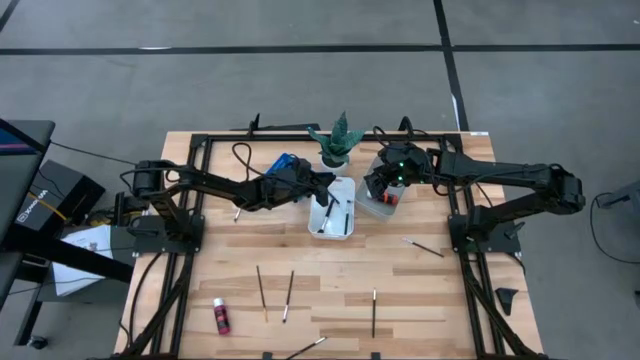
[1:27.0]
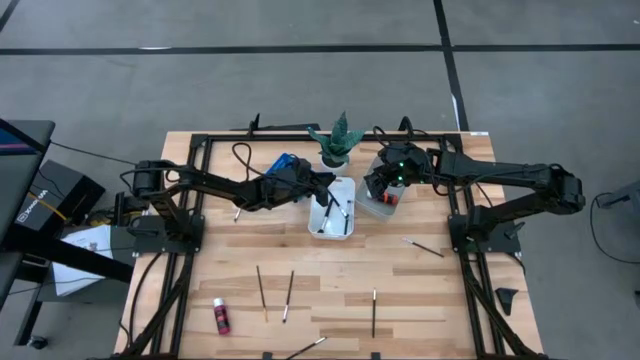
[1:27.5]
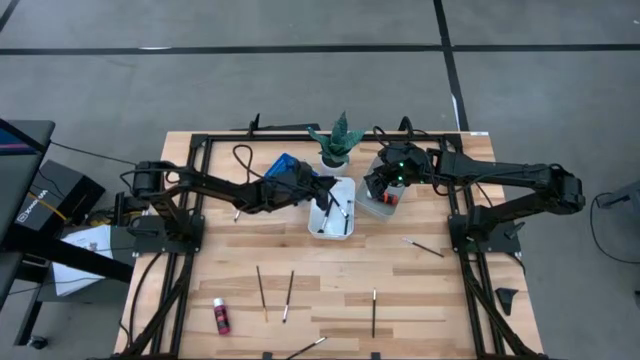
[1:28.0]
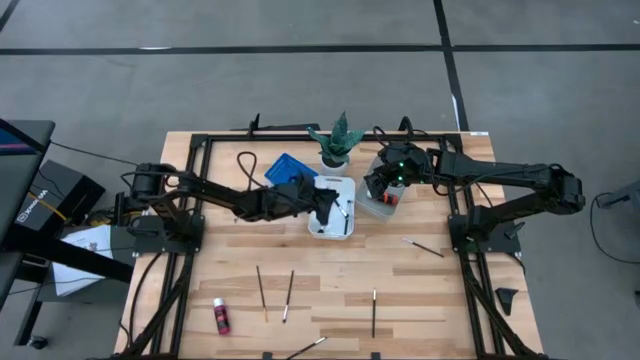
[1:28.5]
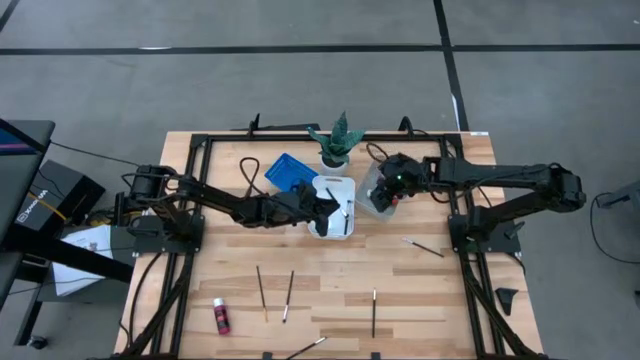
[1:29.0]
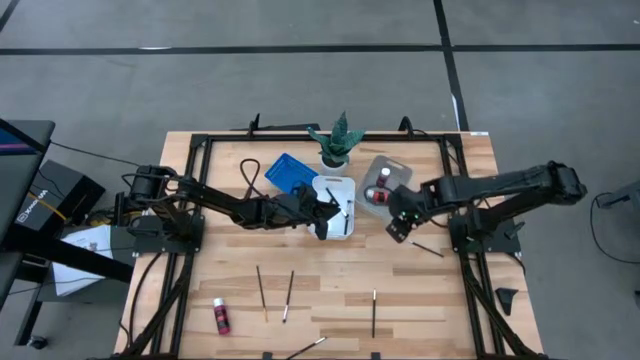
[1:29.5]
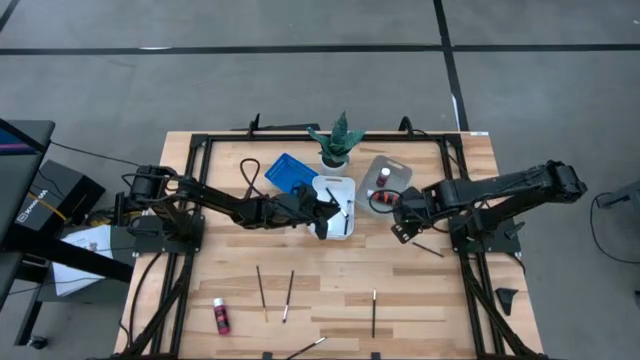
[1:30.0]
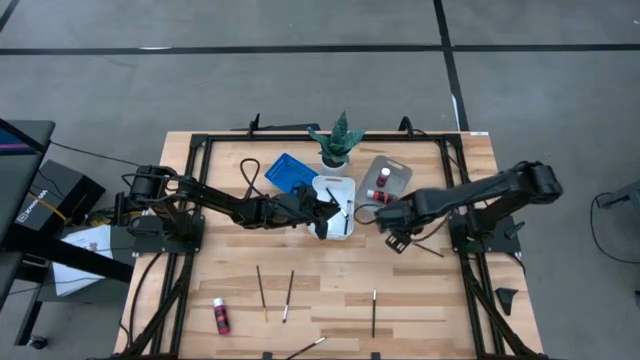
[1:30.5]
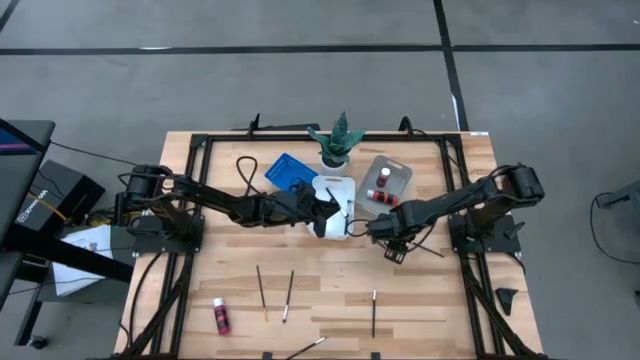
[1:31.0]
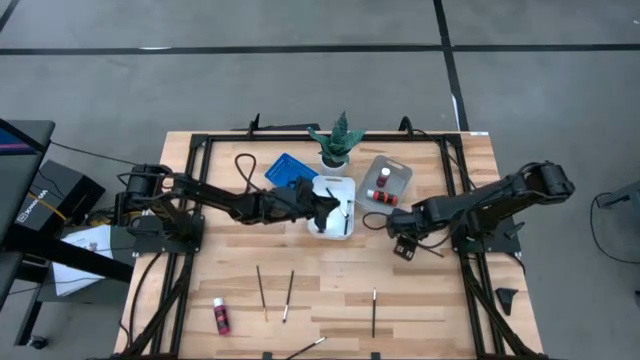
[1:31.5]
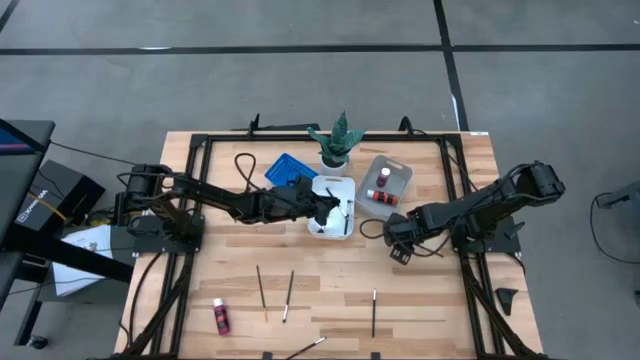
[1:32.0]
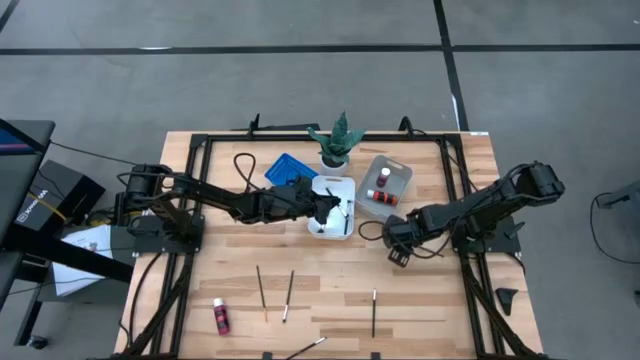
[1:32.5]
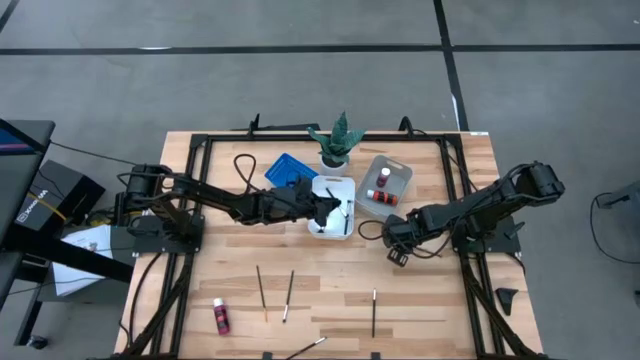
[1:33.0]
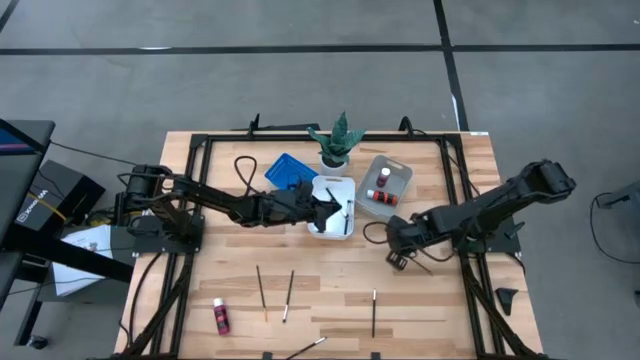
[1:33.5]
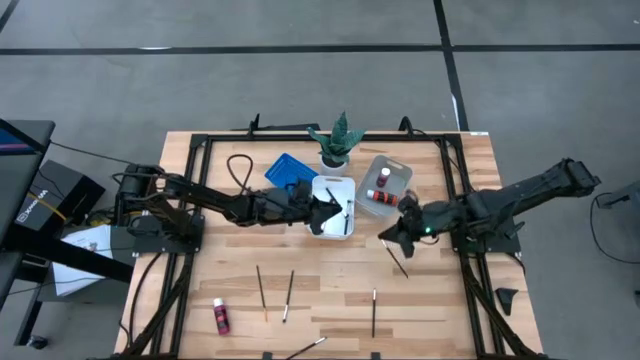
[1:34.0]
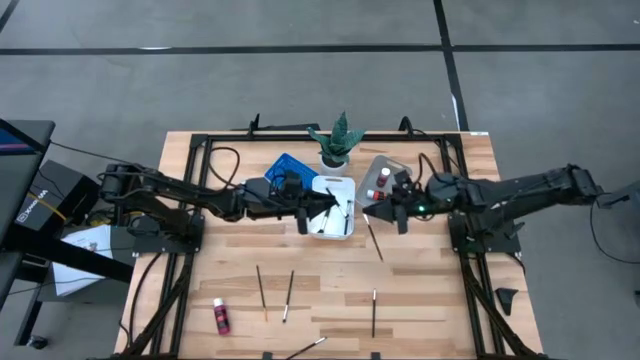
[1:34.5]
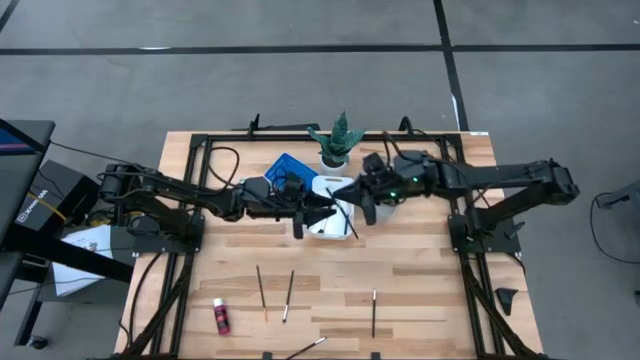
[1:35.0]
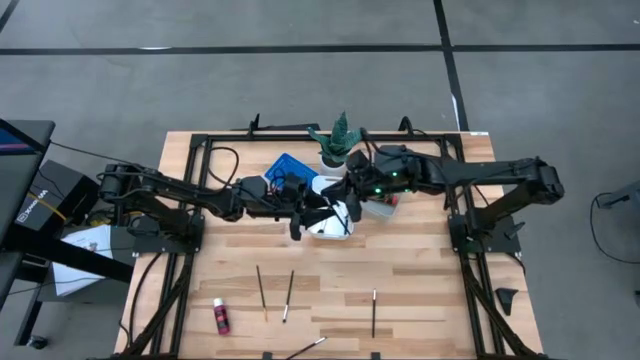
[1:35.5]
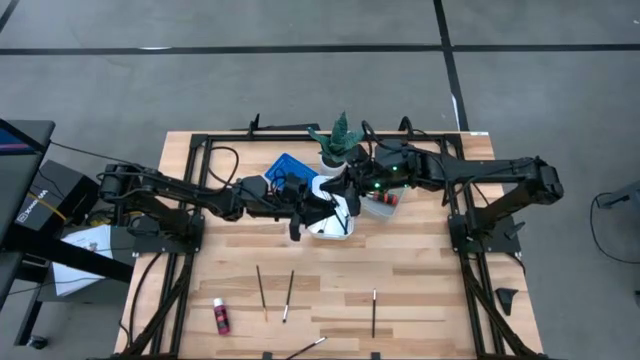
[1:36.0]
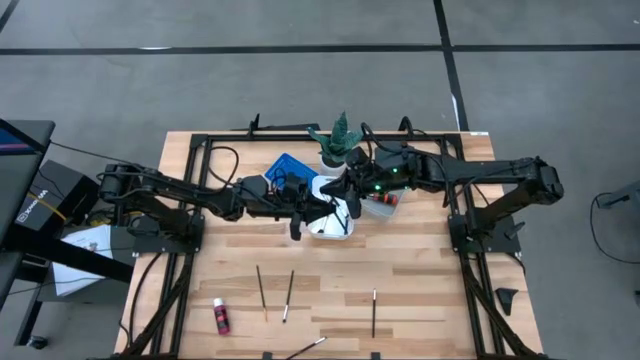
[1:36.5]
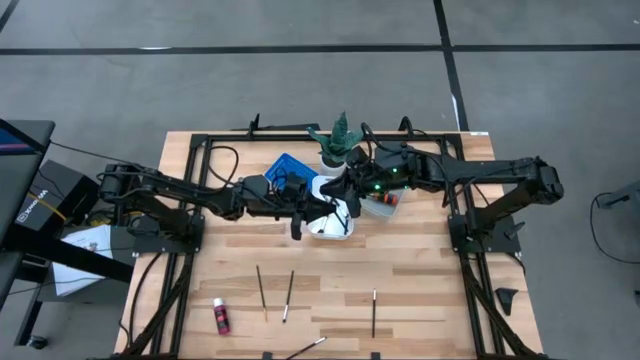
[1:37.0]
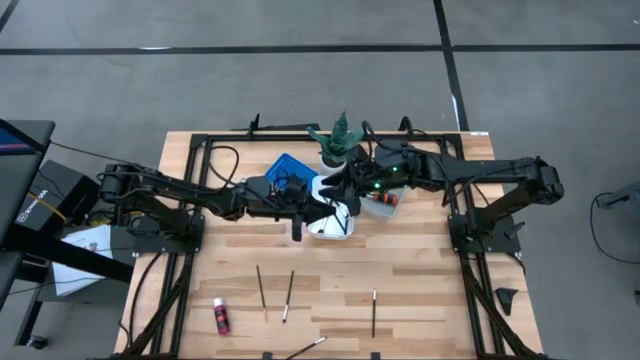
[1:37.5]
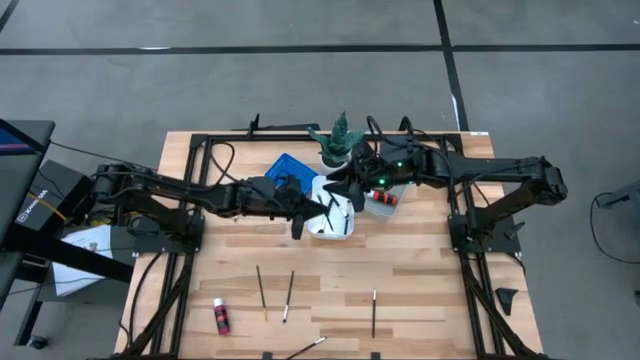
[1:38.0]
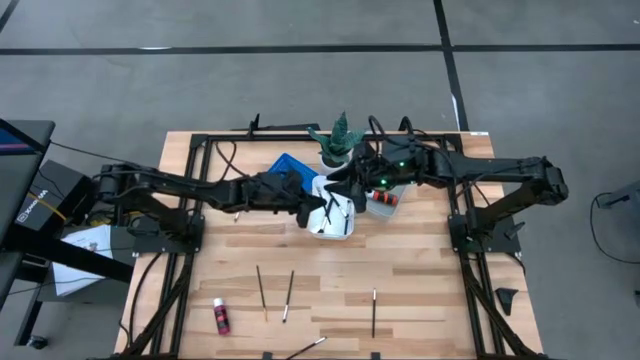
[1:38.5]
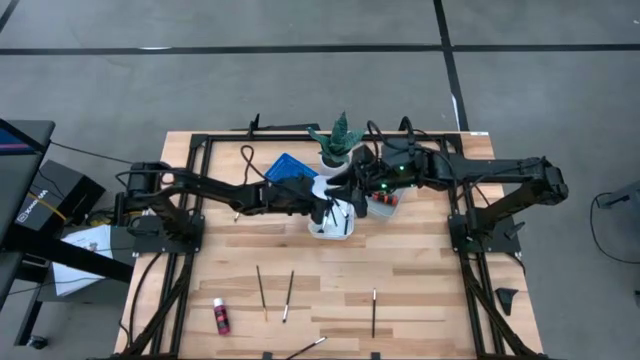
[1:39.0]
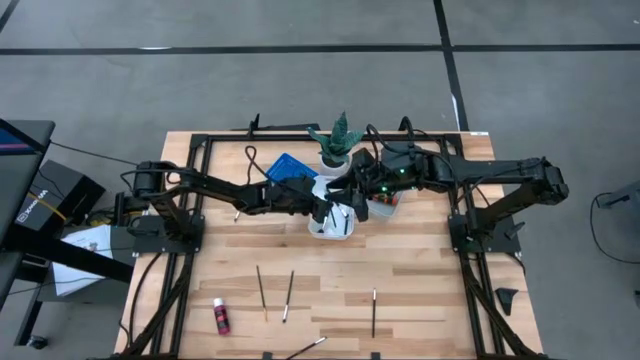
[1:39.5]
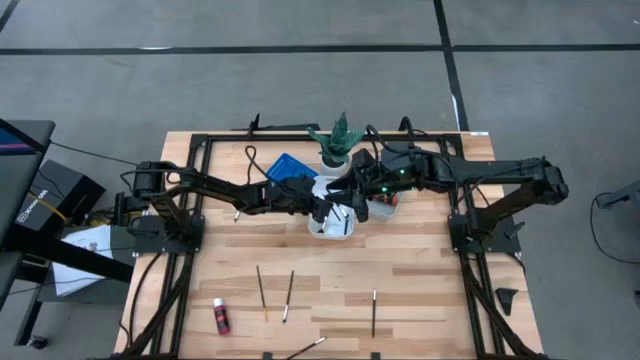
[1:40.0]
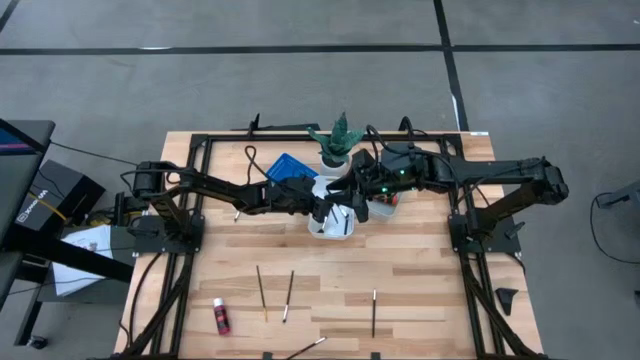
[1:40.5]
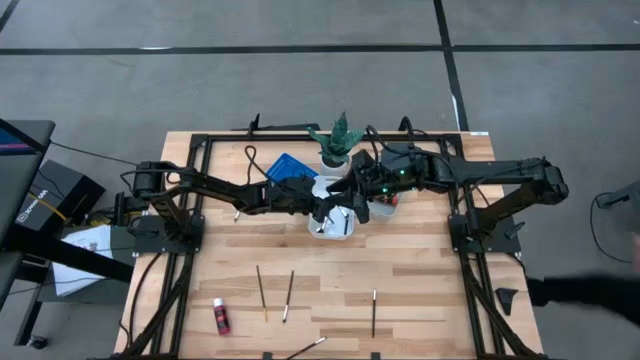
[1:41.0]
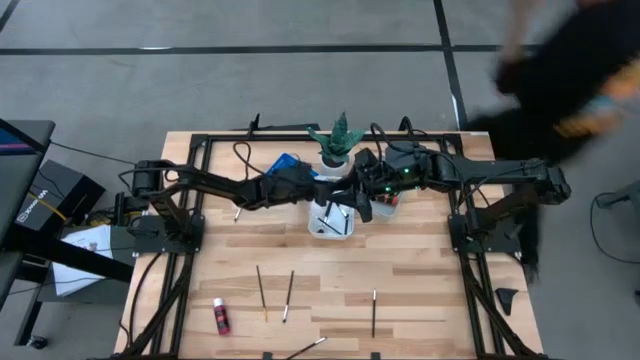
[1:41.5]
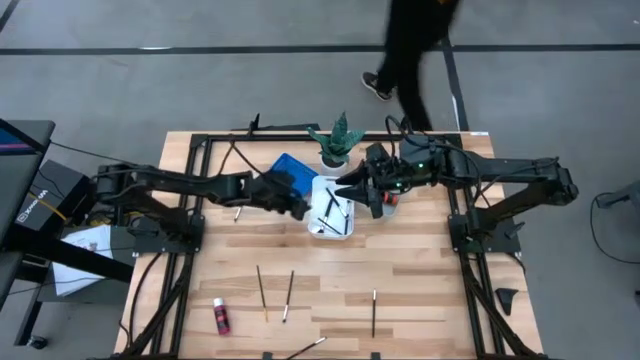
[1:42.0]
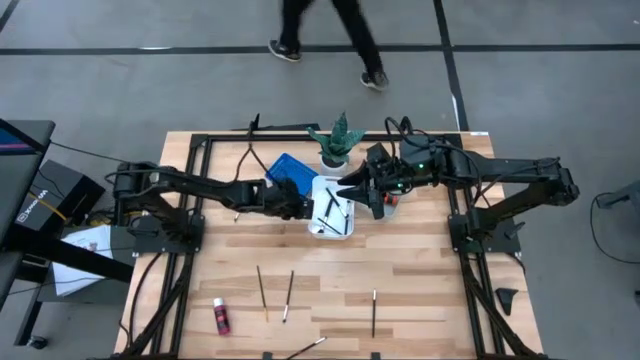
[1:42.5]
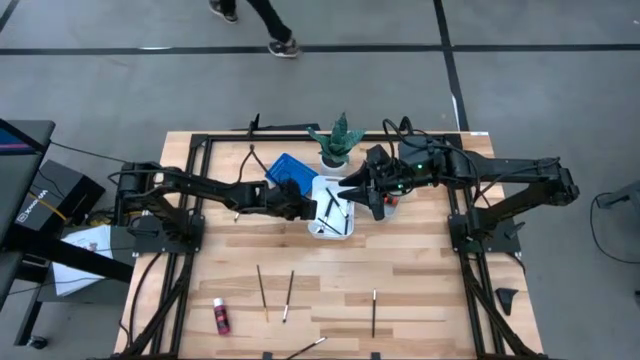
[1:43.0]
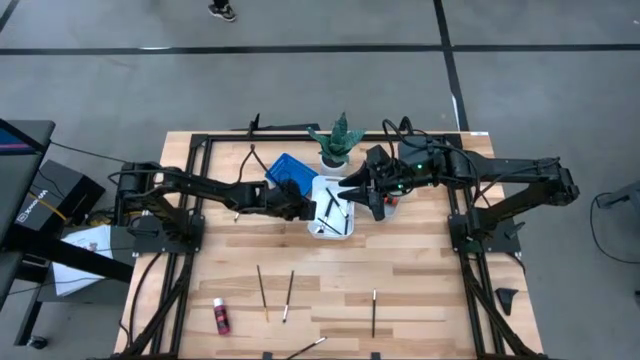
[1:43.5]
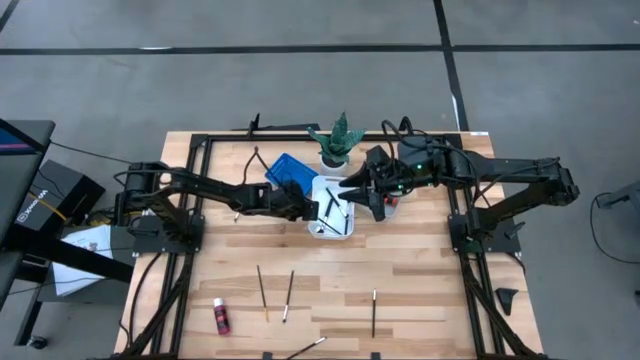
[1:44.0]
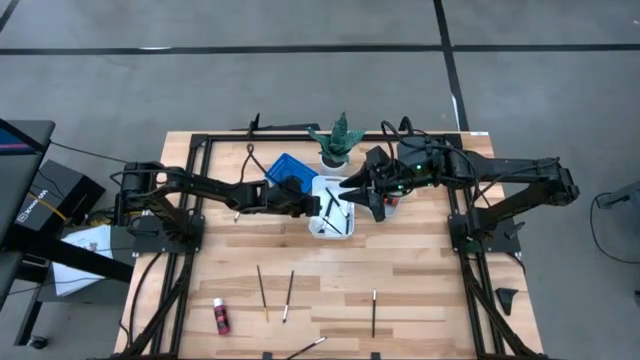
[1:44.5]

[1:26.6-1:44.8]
Task: Pick & Place Paint Supplies
Put the large black paint brush into the white bin

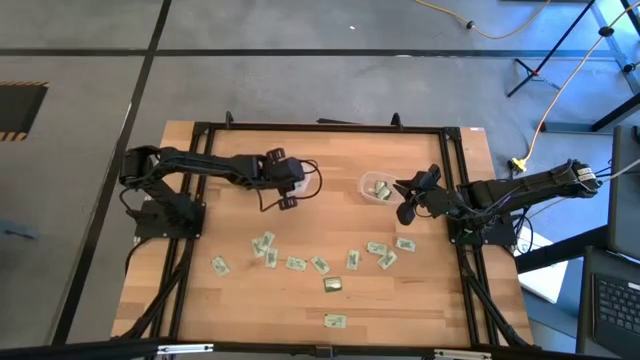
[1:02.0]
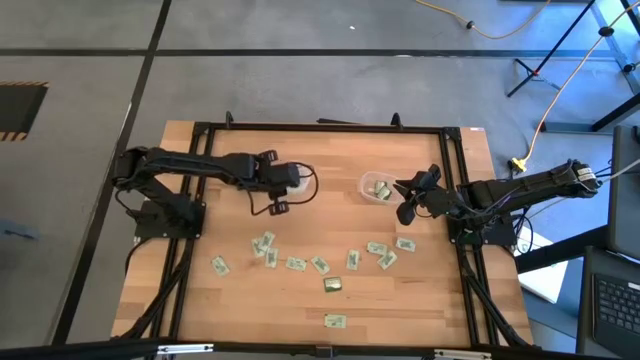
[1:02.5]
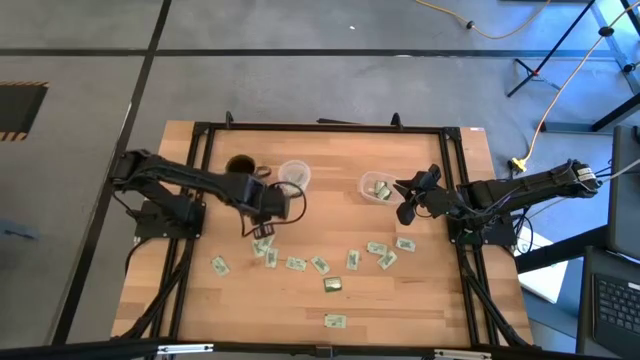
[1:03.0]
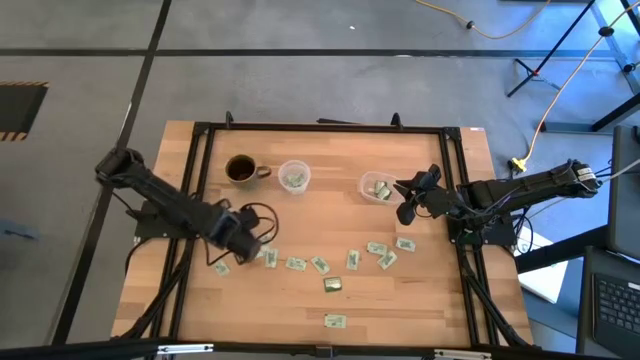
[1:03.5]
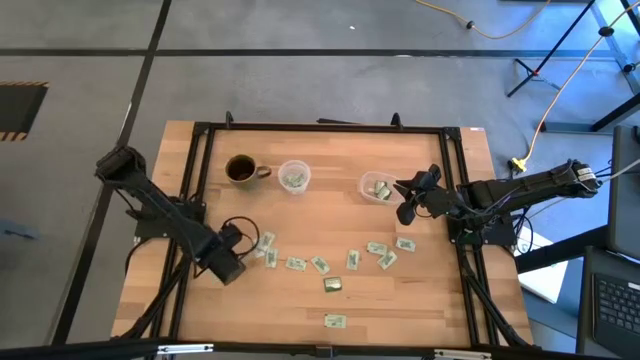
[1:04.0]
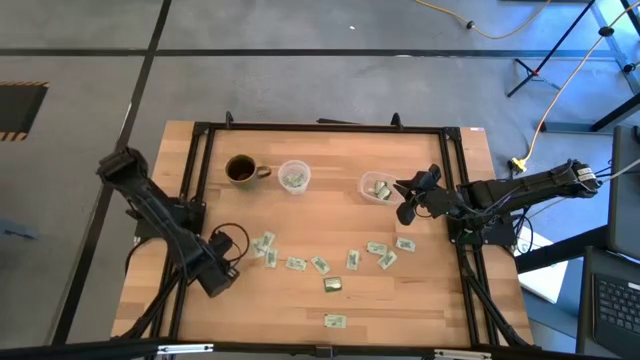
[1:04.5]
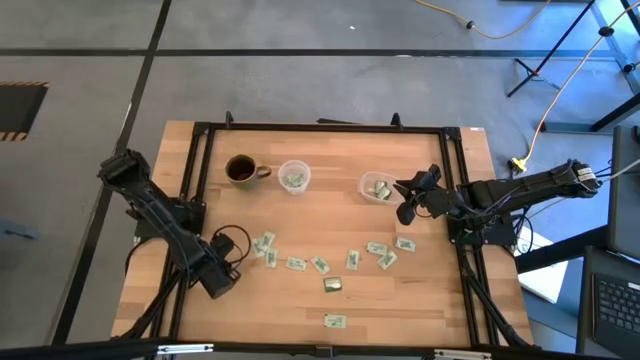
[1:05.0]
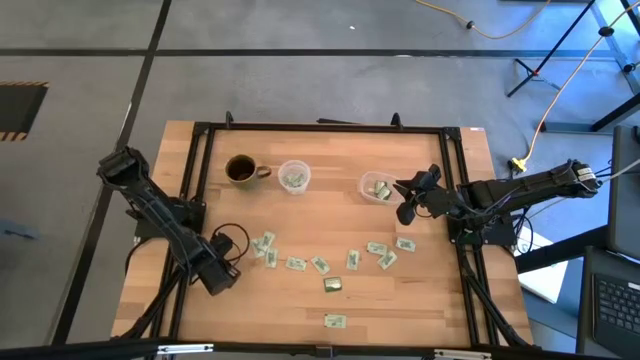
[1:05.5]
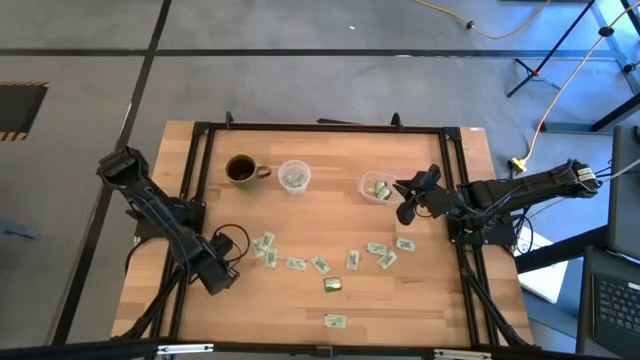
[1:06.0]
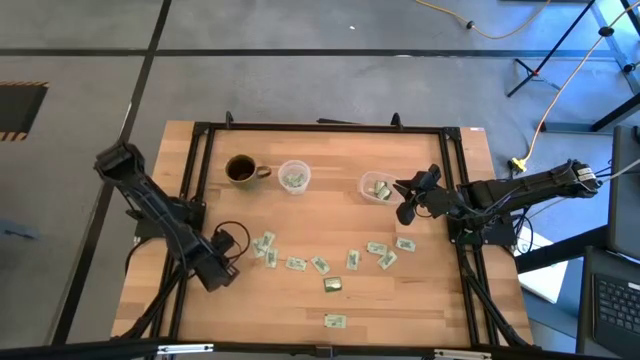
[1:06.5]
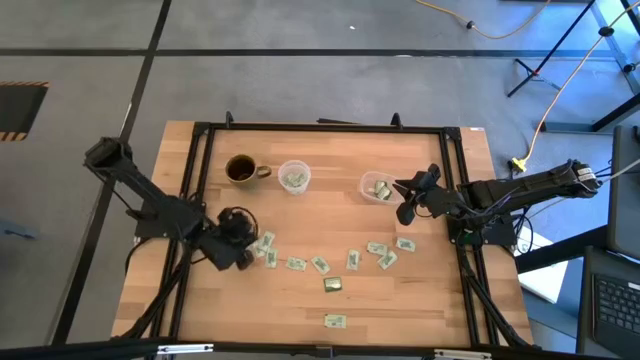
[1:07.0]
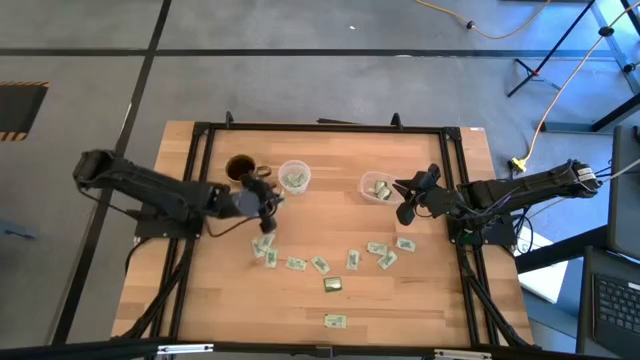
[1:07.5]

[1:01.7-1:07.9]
Task: Pick and place items into bin
Put the white stevia packet into the left transparent bin
